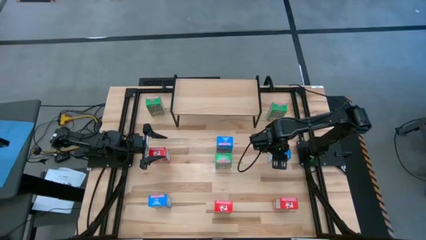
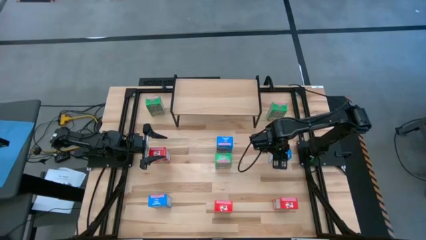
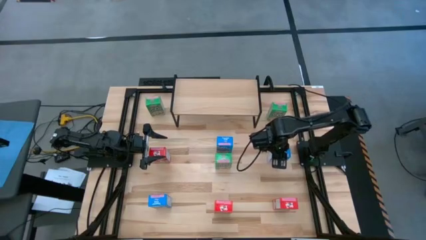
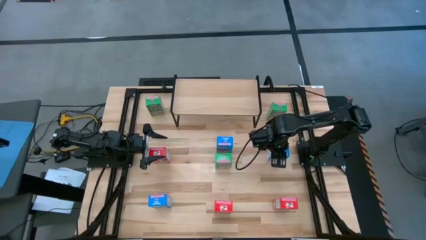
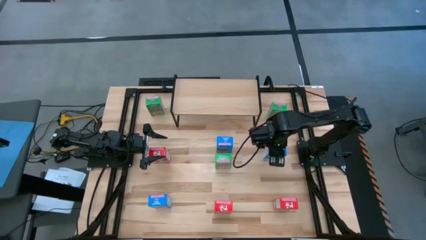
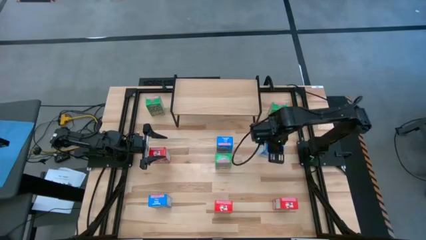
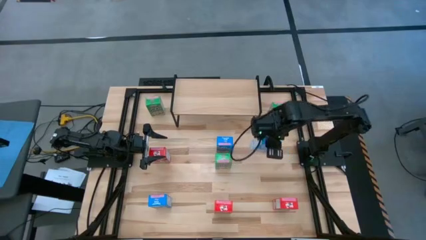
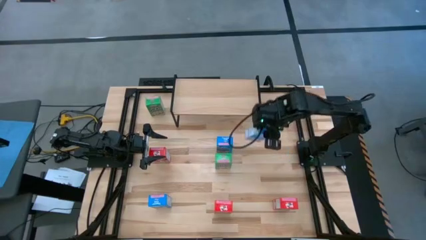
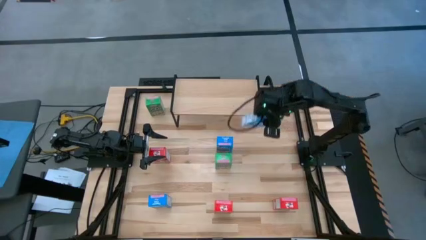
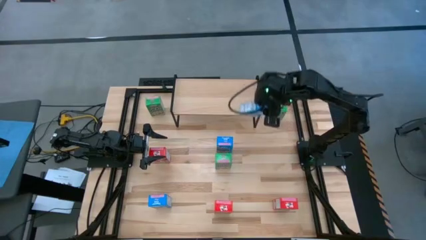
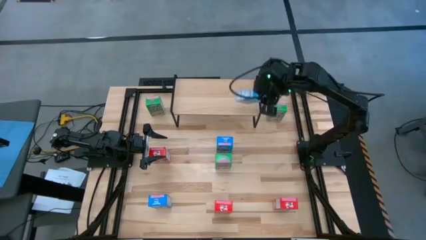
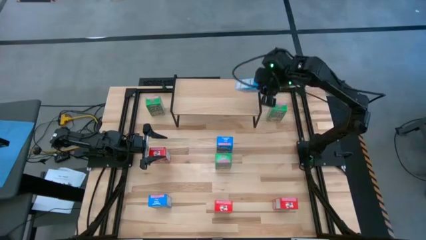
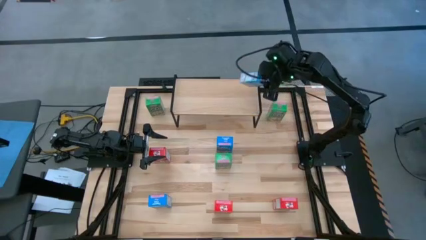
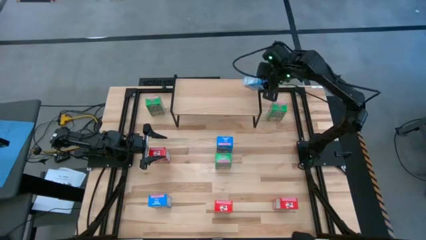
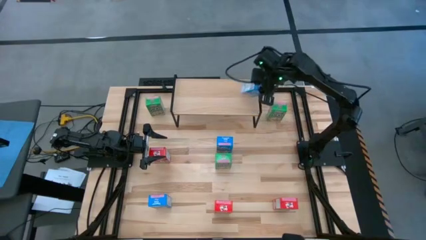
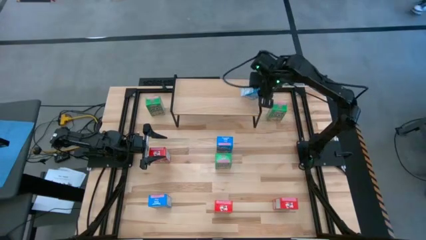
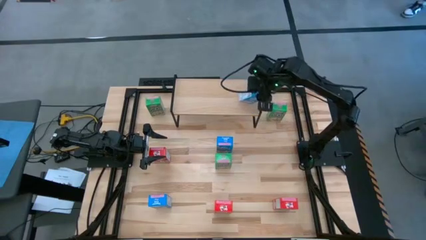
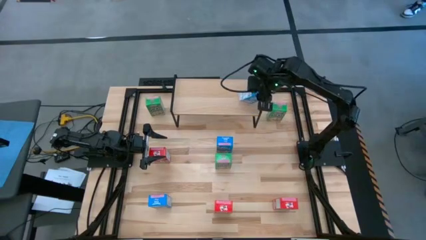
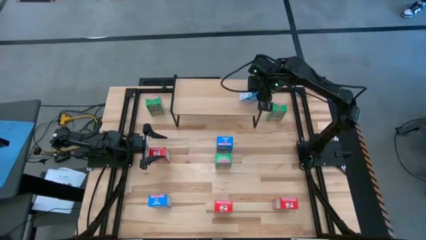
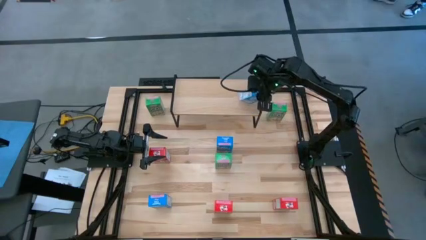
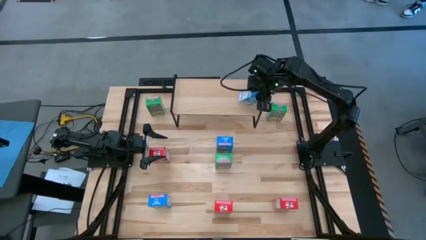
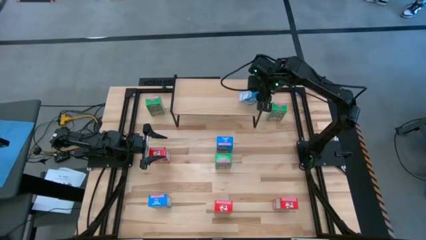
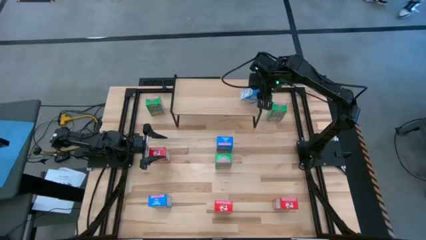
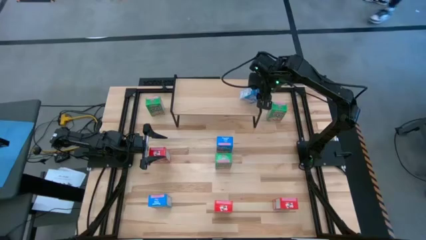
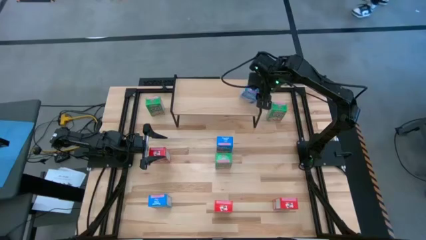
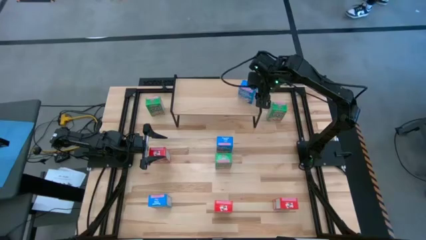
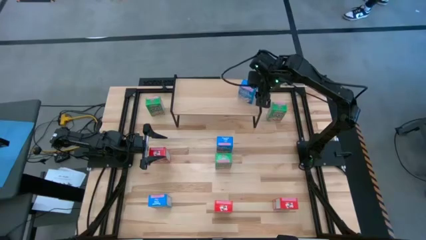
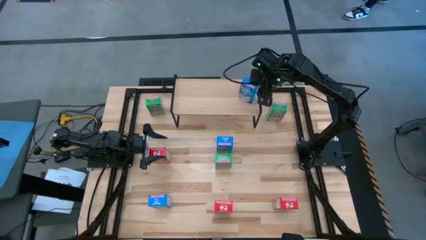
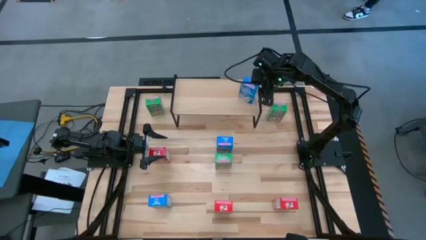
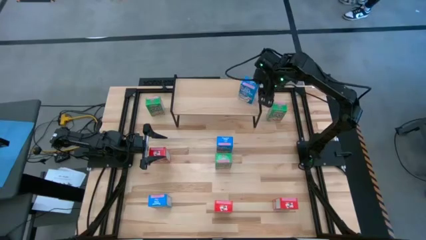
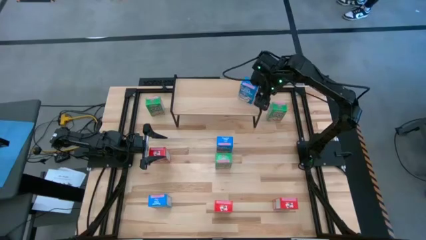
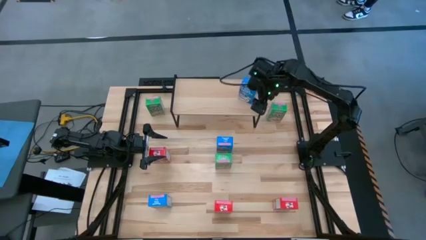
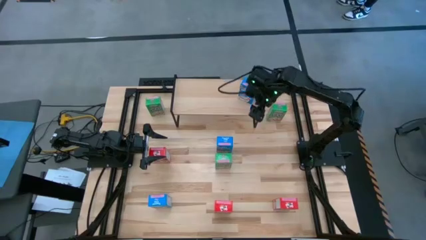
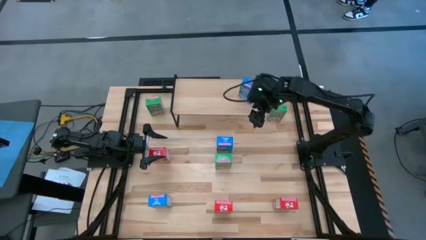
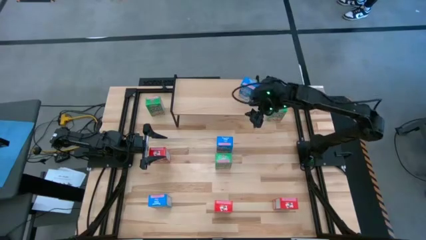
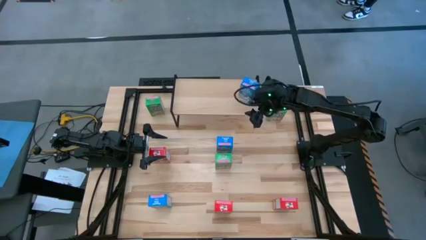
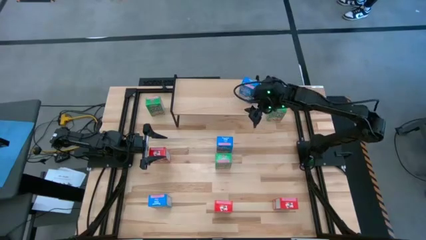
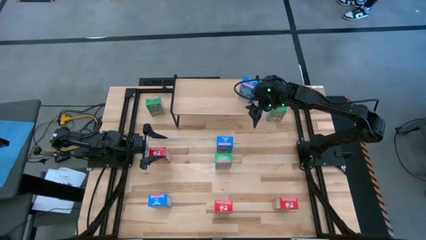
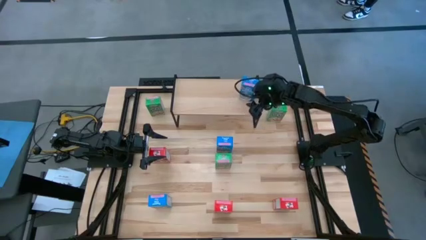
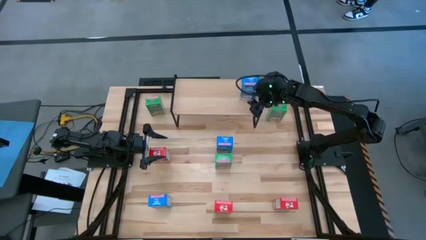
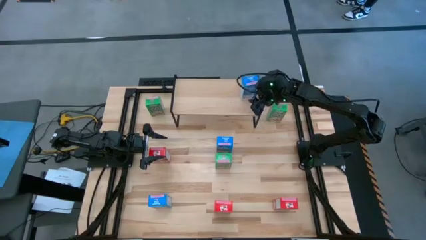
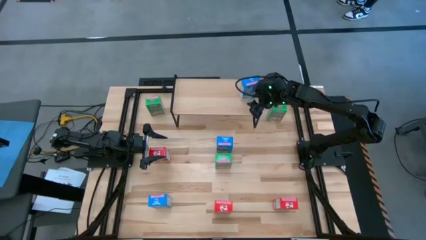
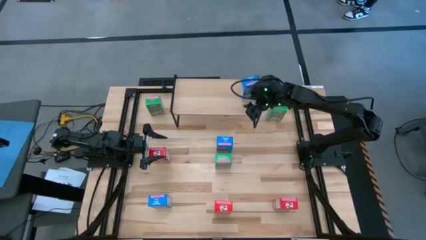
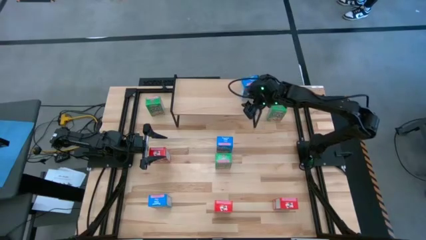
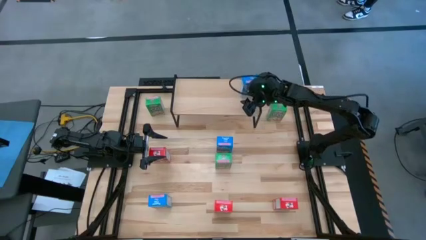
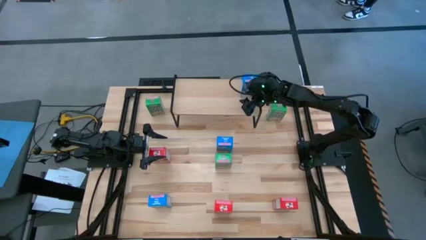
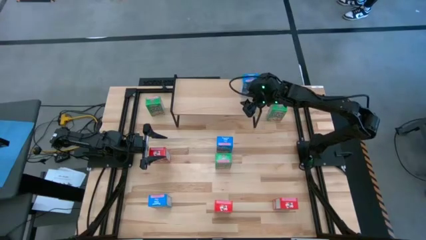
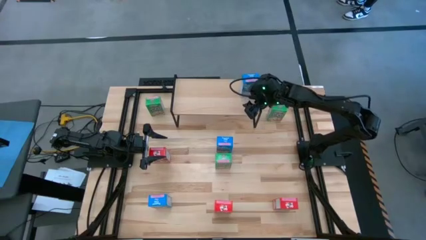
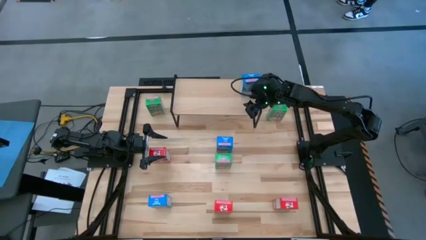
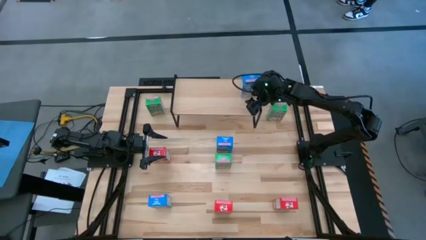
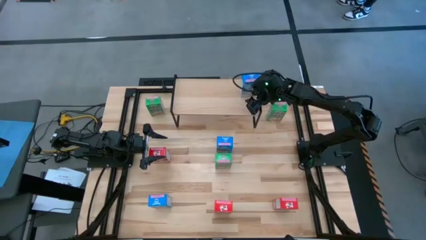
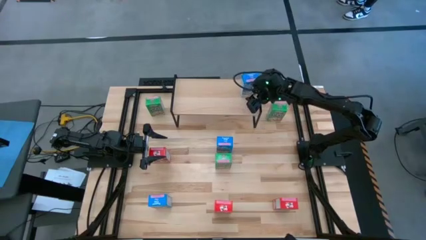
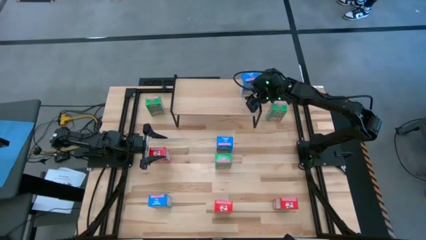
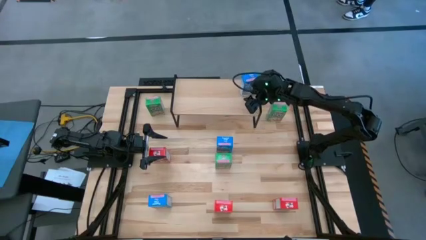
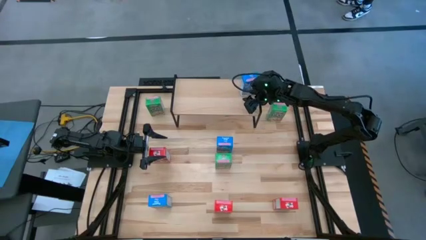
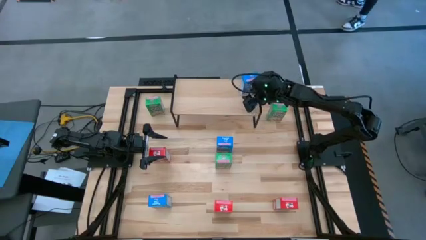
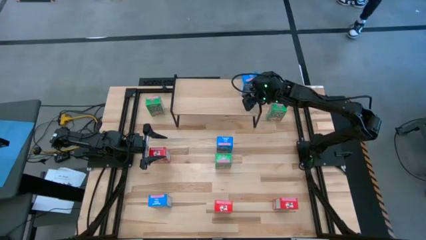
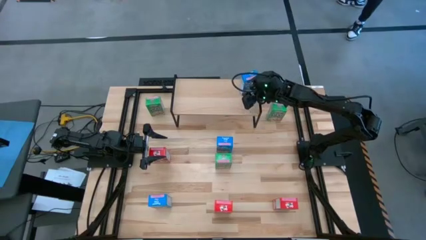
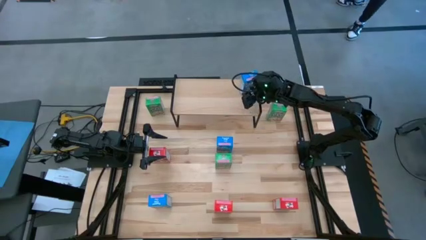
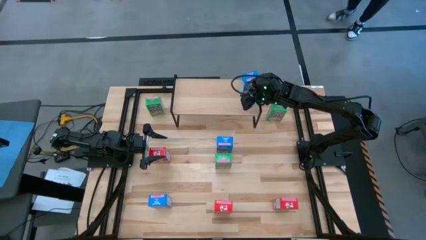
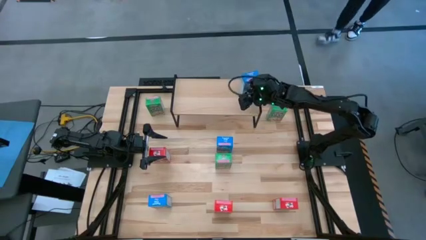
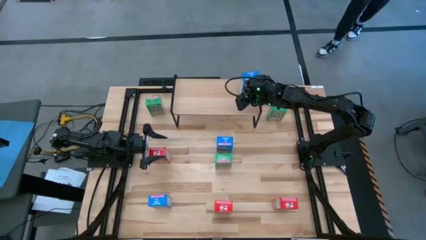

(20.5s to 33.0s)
Task: Stack cereal on shelf
Put the top right blue cereal box on the shelf

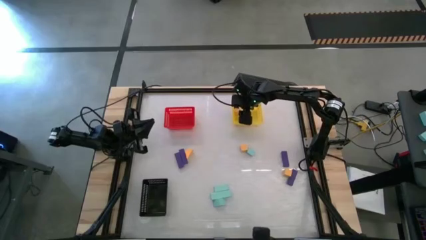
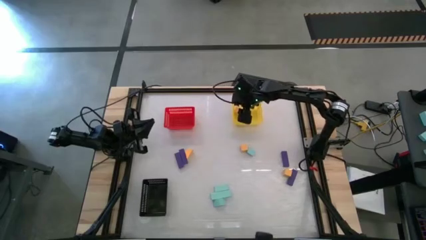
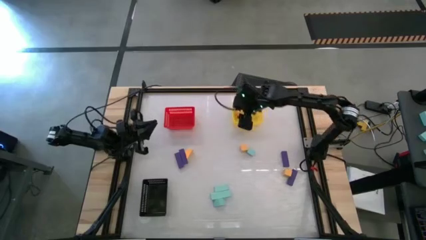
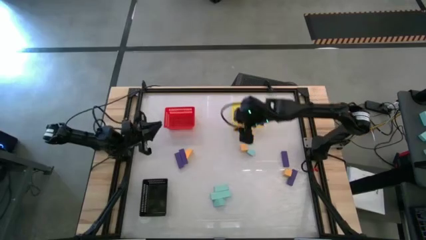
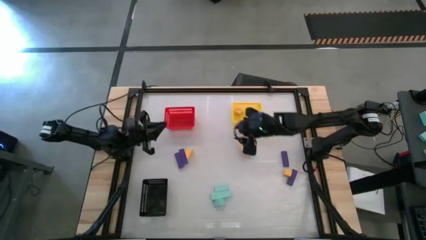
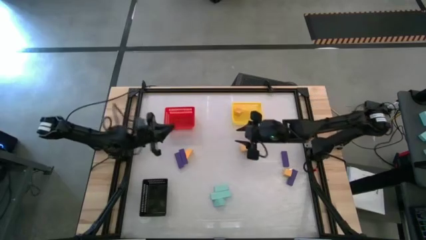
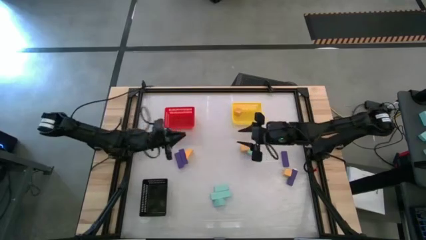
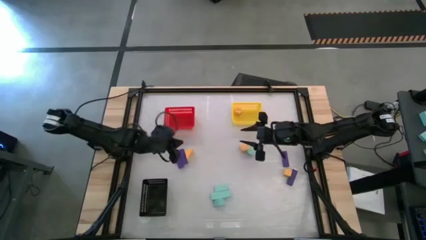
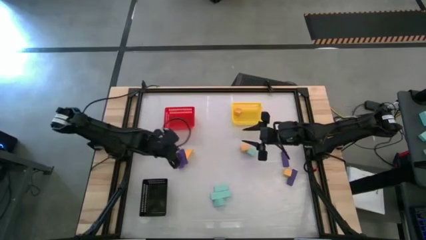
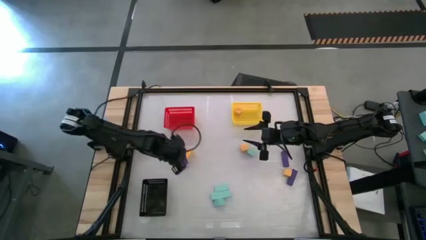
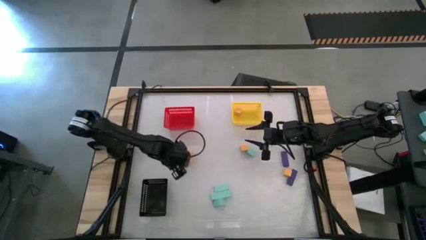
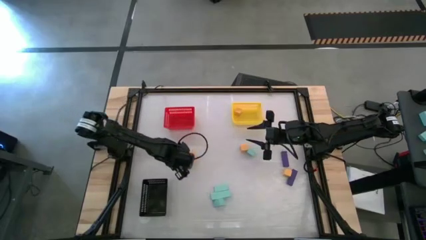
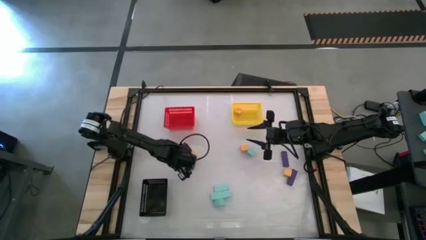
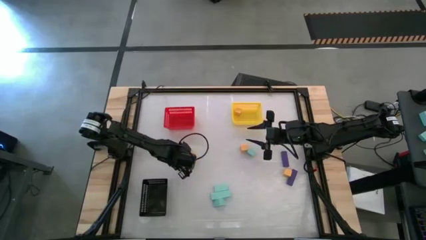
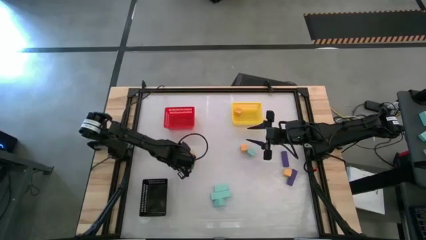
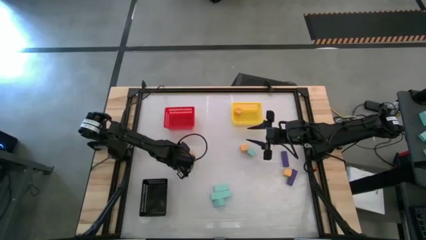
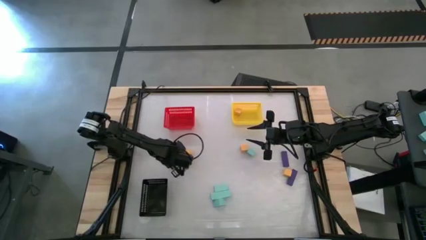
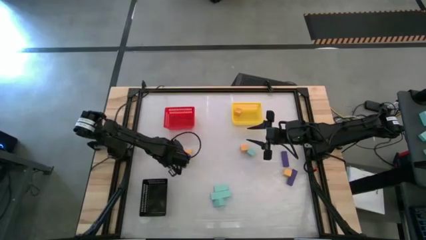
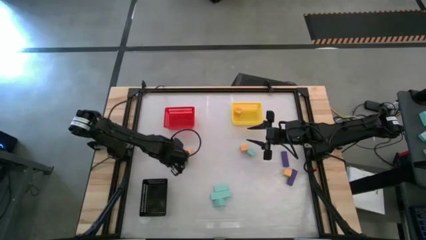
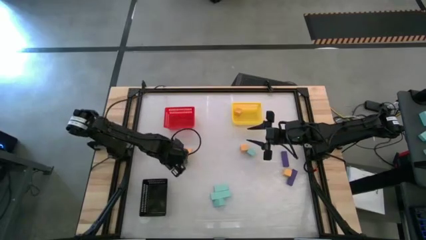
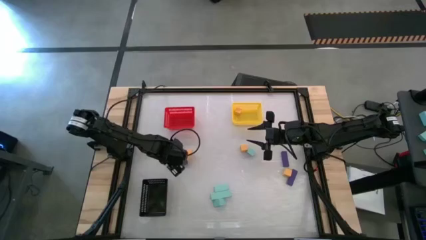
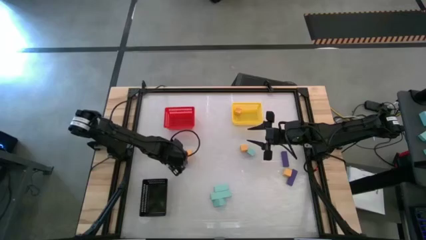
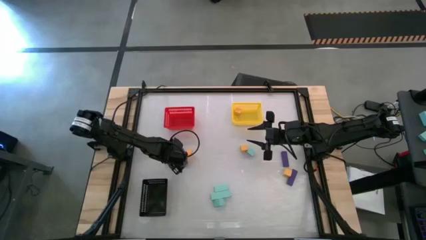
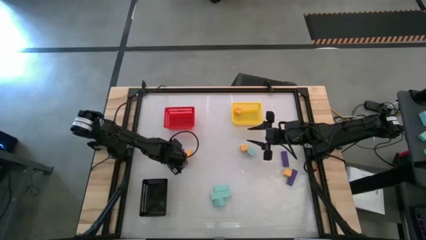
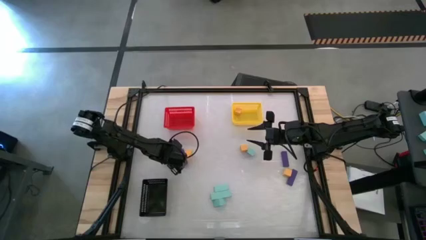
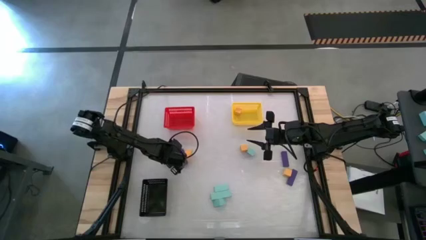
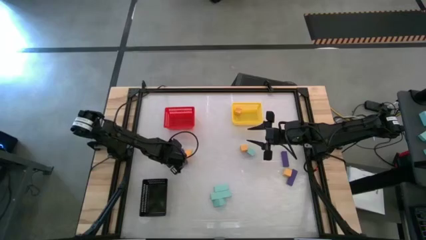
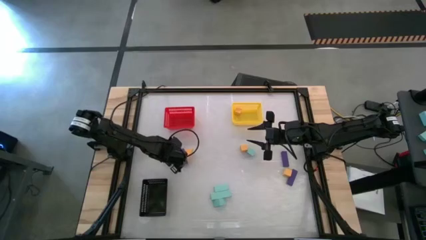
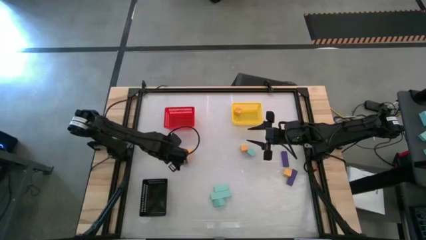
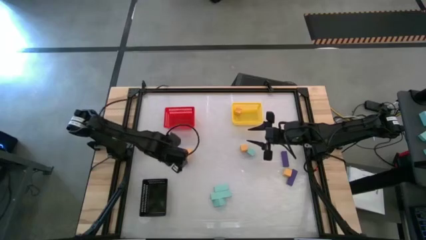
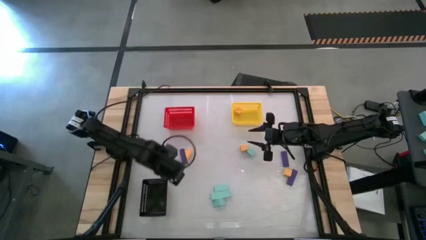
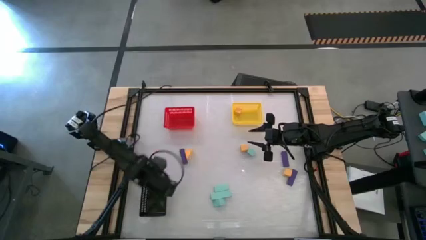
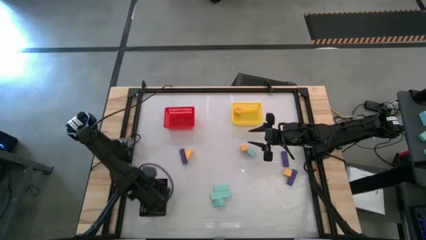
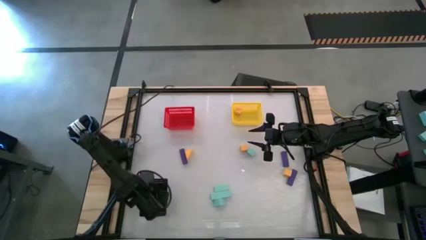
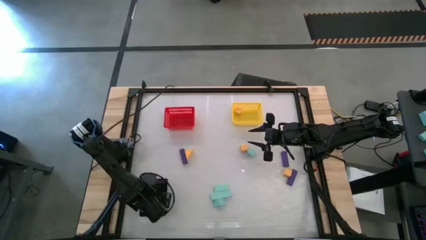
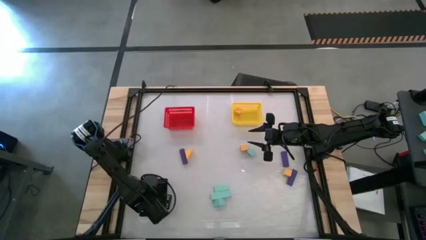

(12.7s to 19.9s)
Task: Sort & place blocks by color
Put the purple block into the black bin
